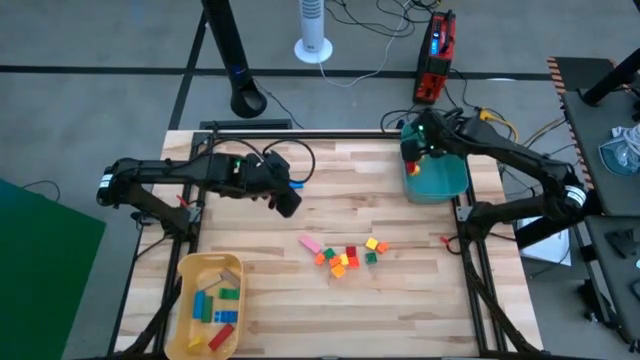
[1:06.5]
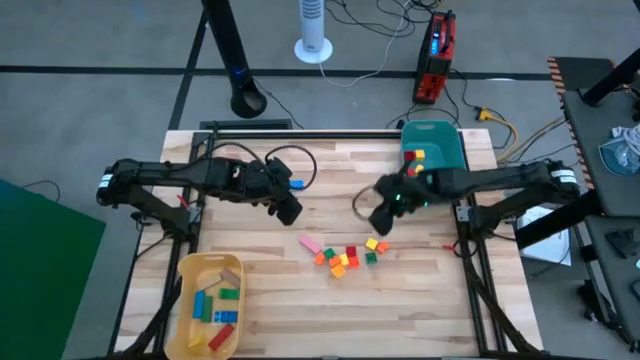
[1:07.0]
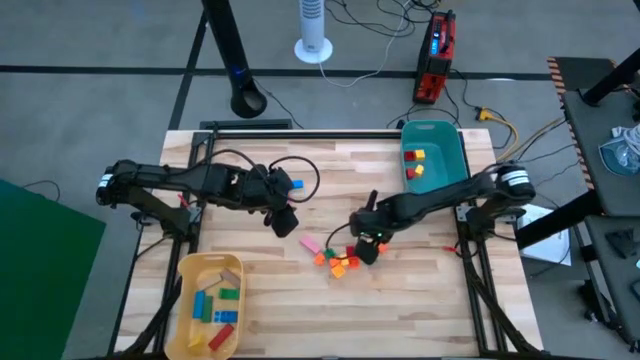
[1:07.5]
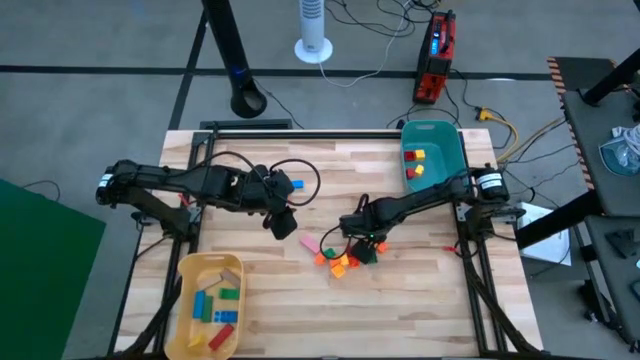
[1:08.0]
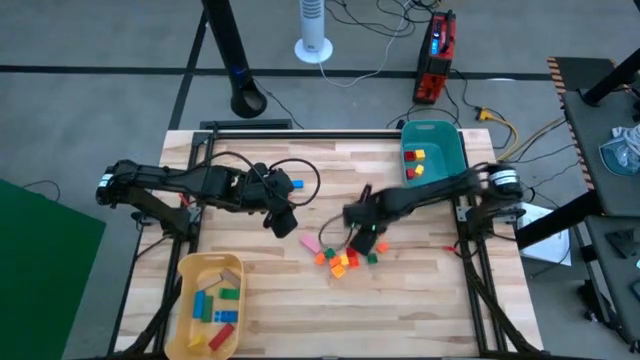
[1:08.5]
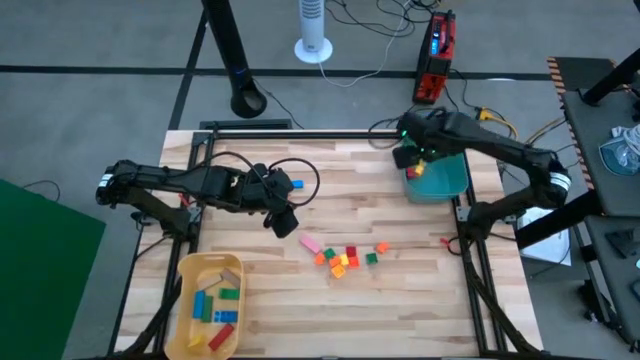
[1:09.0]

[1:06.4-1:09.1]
Task: Sort blocks
Put the yellow square block into the green bin

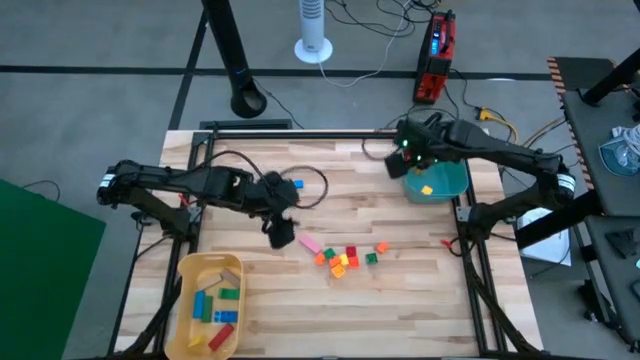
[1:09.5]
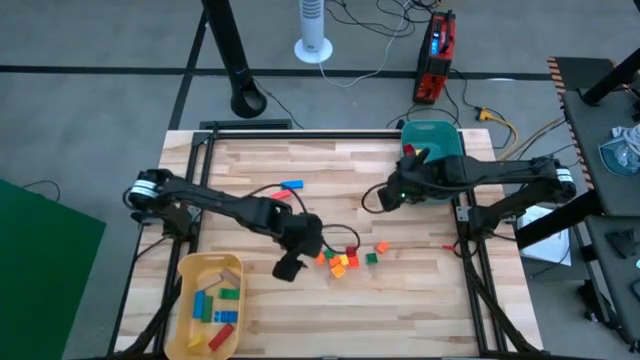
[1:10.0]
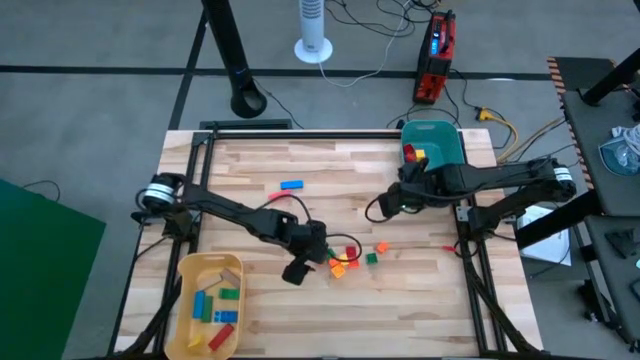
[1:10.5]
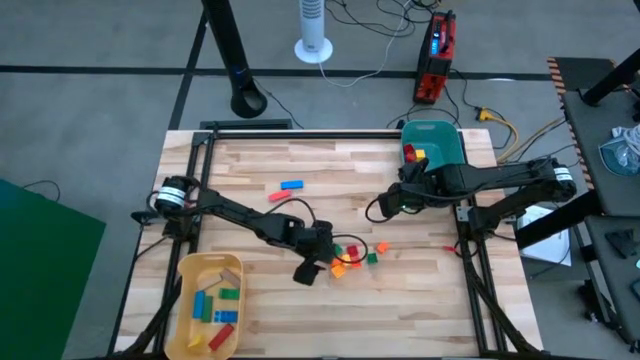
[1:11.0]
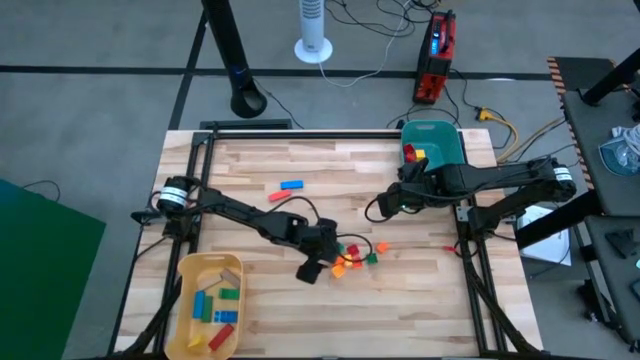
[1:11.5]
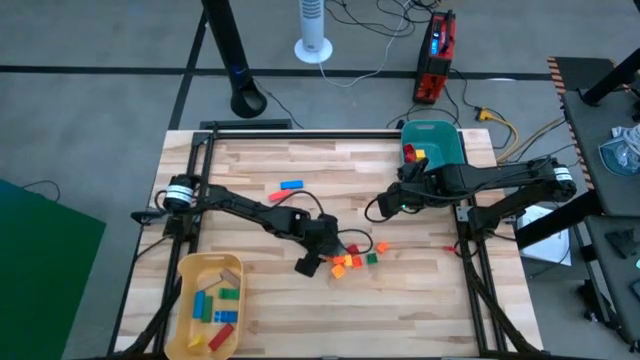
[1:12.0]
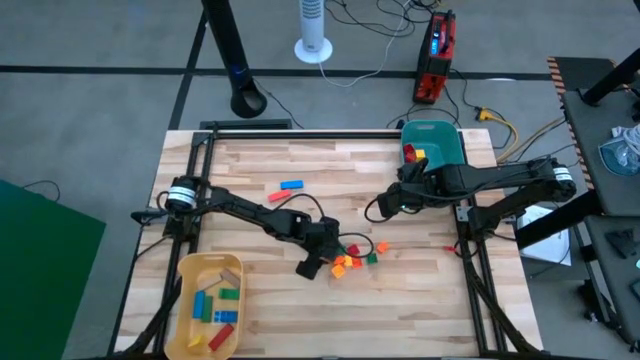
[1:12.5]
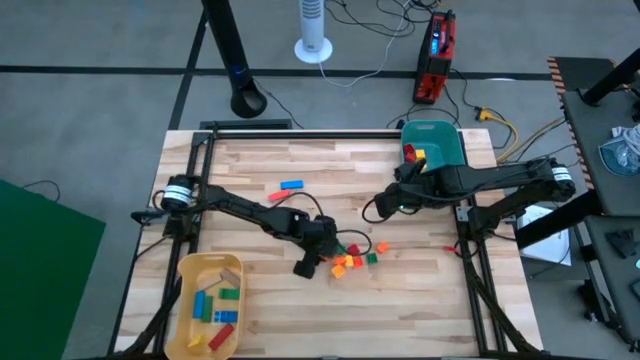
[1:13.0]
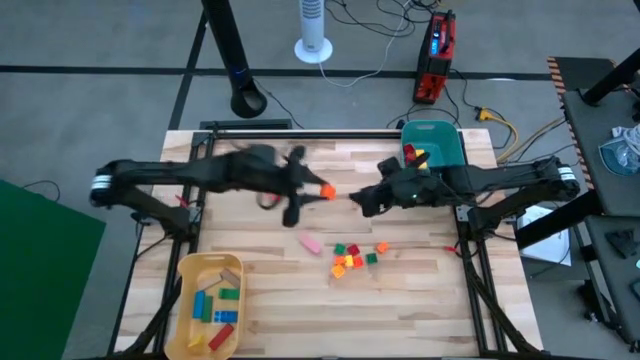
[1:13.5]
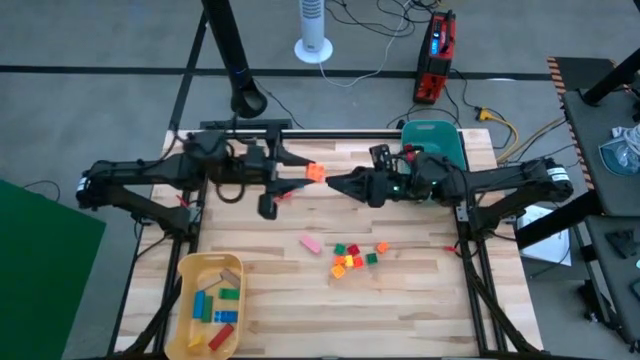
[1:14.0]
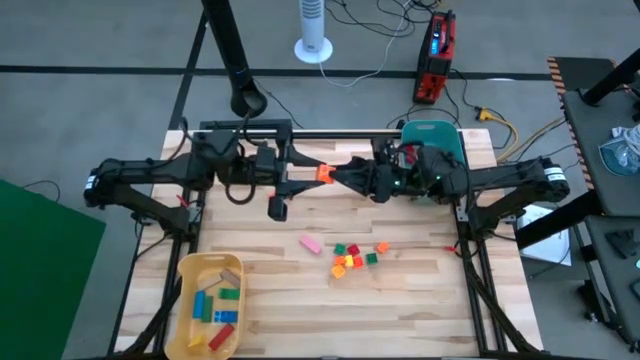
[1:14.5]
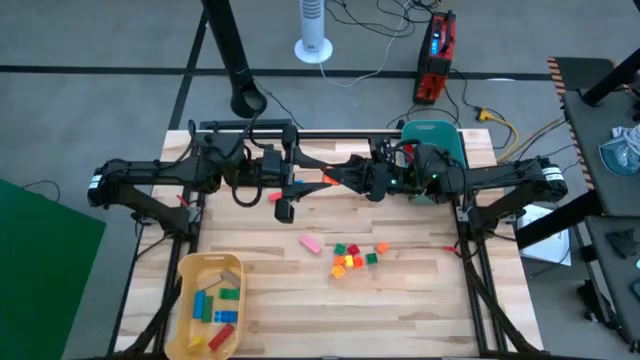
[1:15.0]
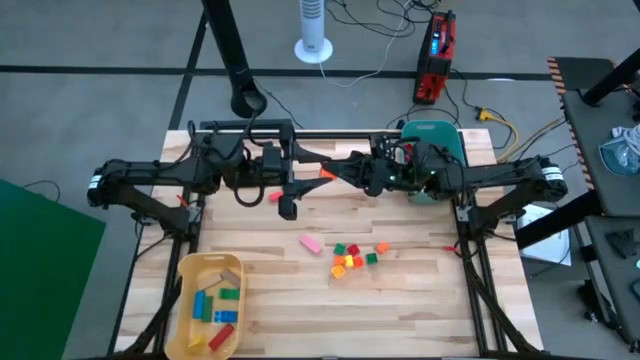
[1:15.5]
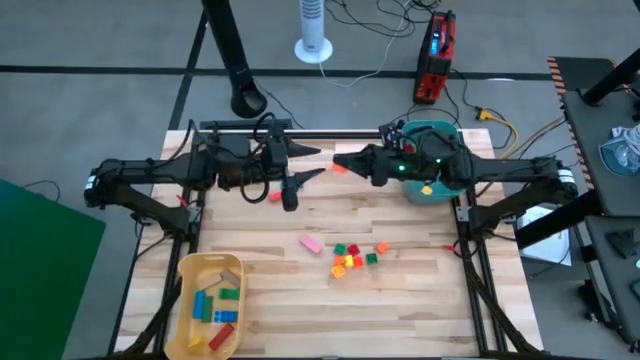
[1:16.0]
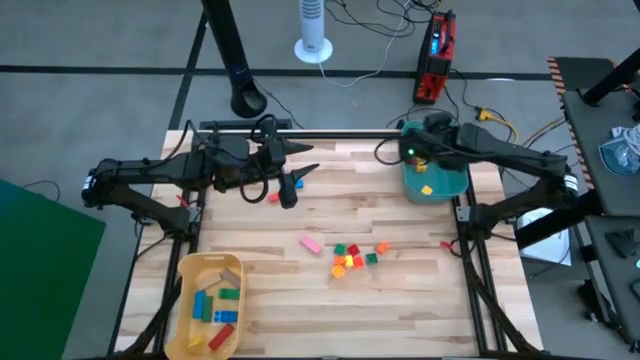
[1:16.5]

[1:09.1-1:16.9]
Put the orange 4-stud game piece into the green bin

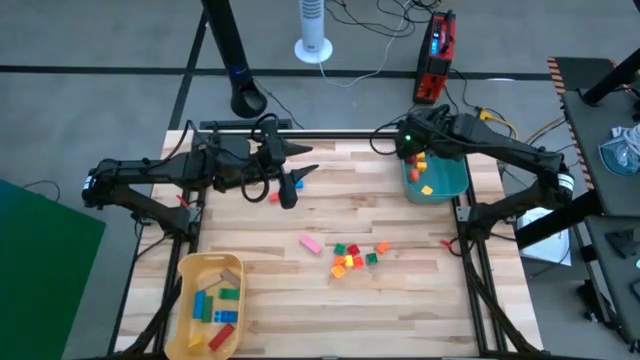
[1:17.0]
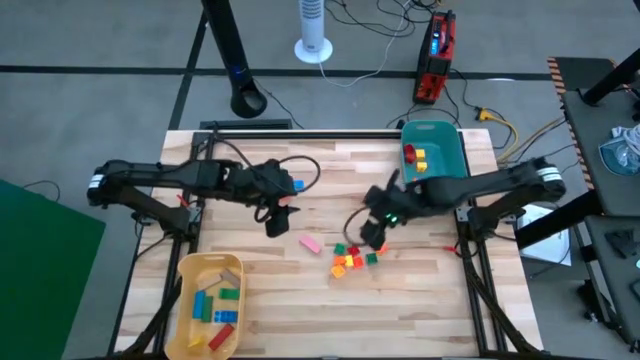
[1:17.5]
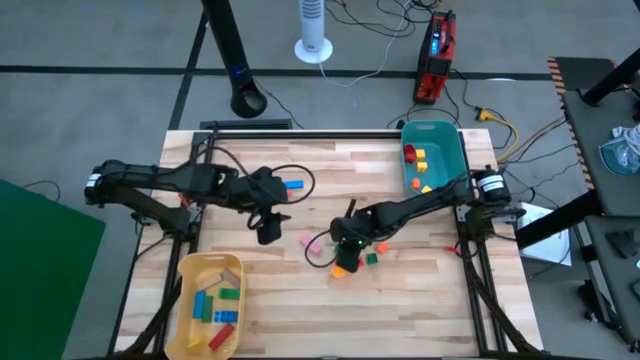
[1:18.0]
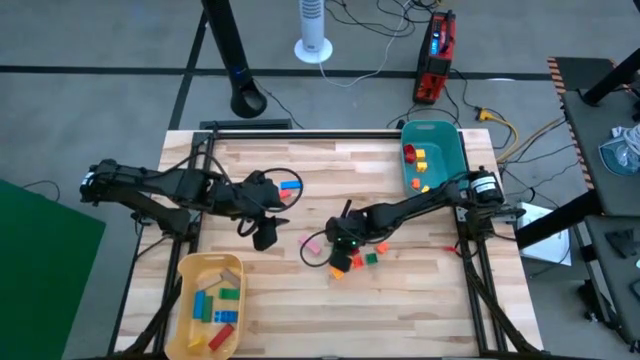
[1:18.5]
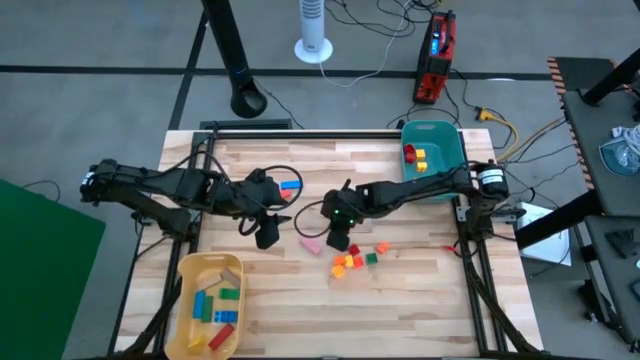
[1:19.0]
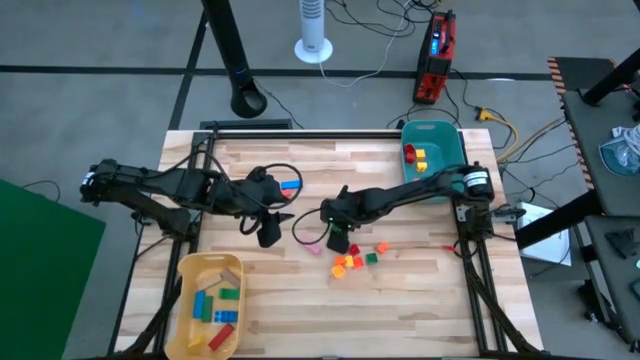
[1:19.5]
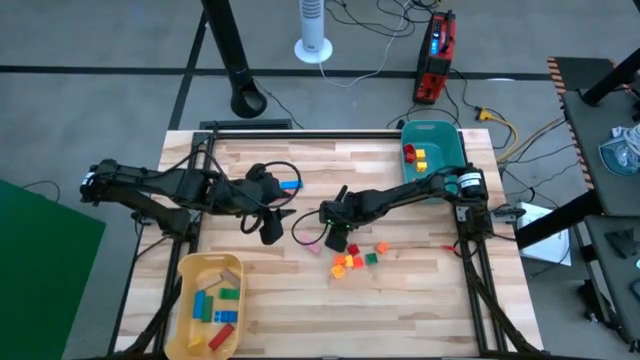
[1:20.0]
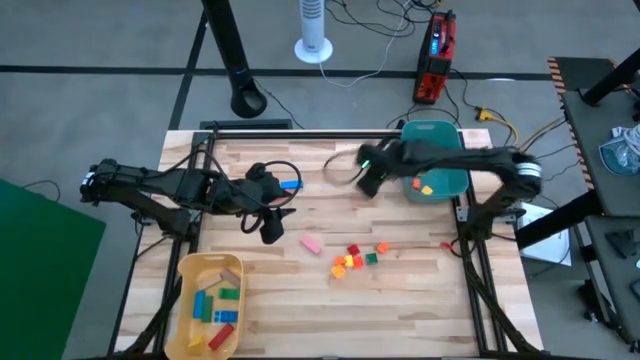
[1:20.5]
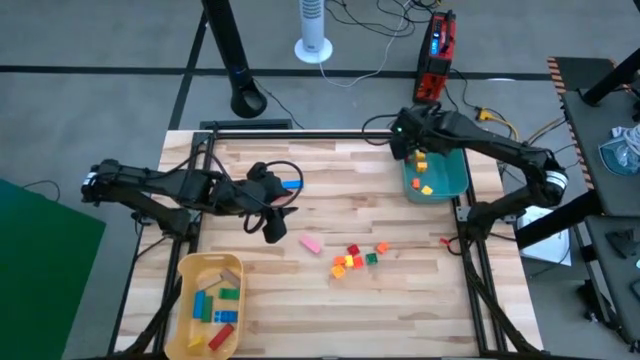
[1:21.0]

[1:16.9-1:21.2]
Put the green 4-stud game piece into the green bin

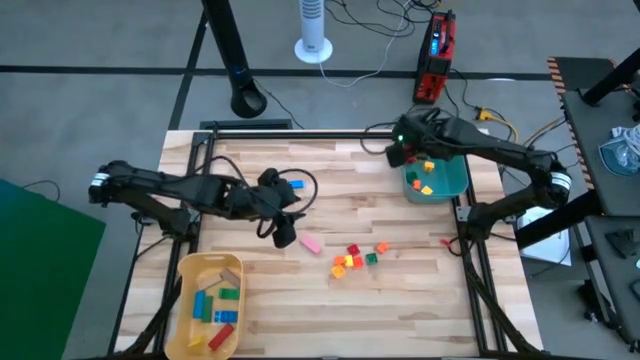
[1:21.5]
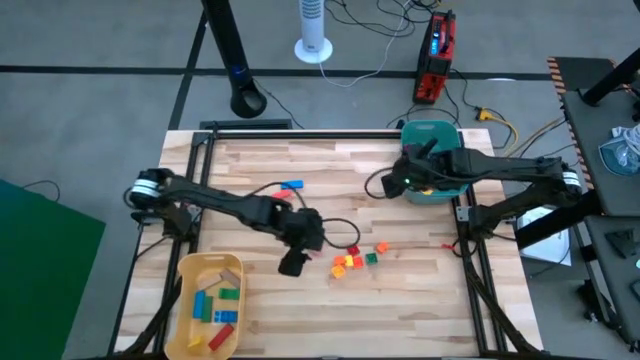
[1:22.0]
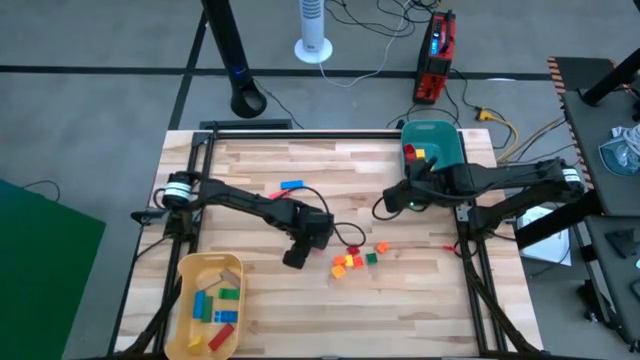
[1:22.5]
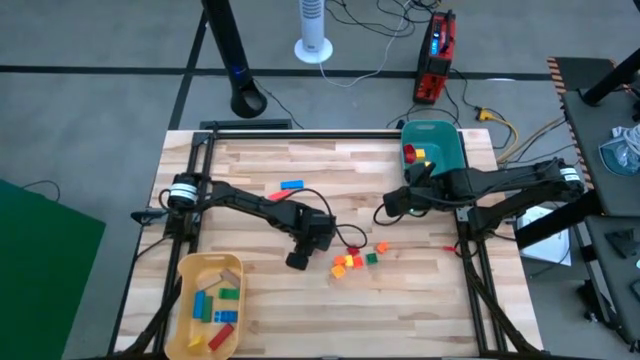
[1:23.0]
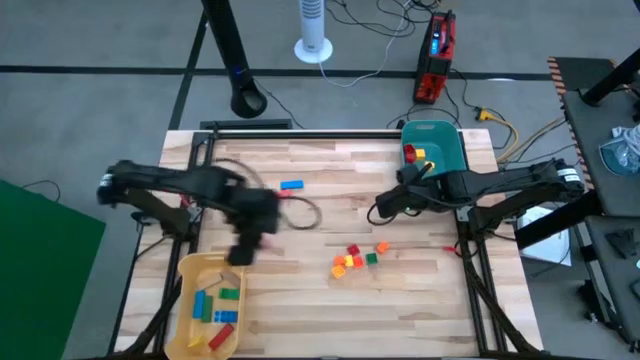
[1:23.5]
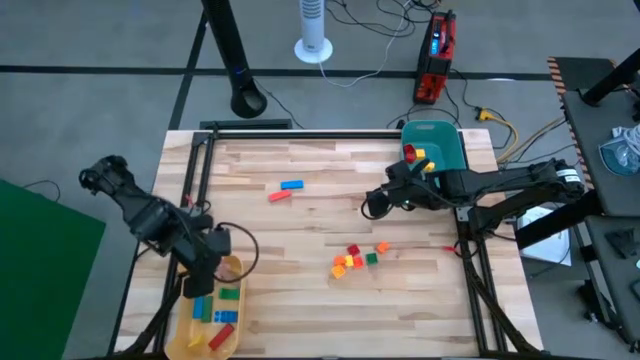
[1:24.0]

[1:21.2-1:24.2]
Put the pink rectangular block into the yellow bin

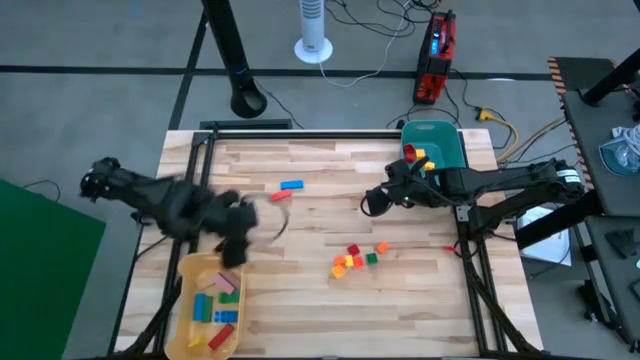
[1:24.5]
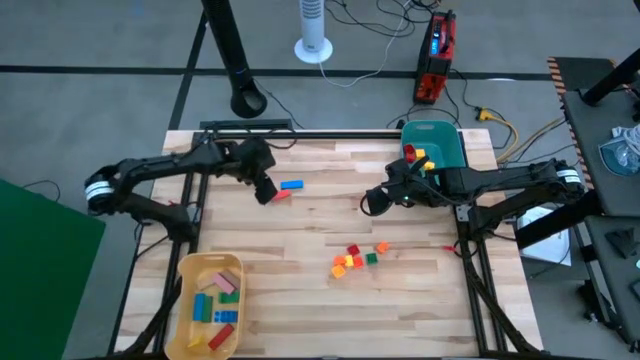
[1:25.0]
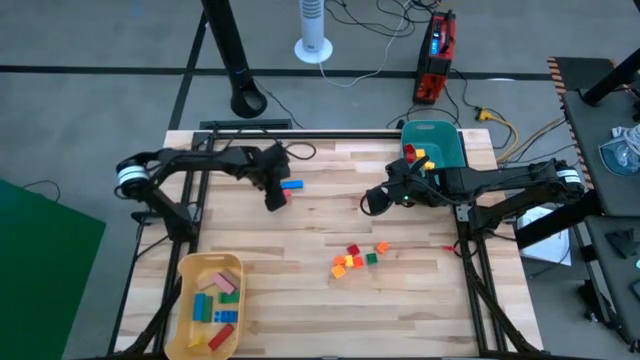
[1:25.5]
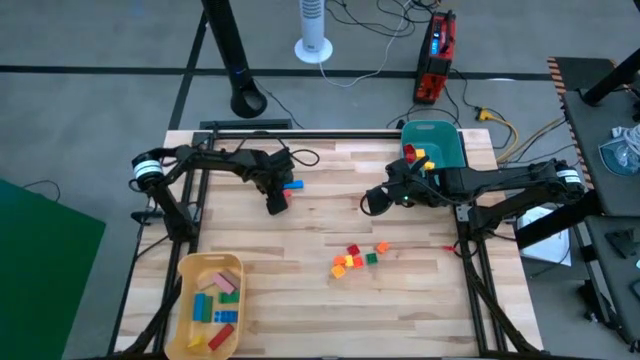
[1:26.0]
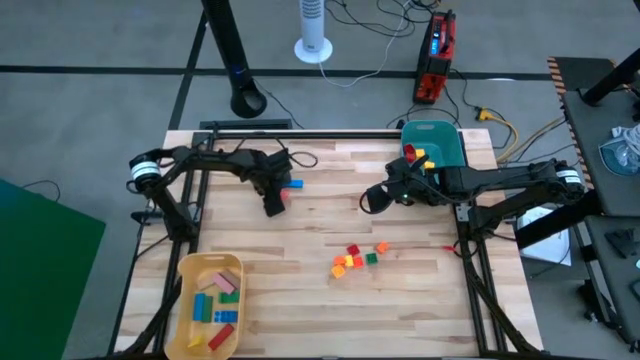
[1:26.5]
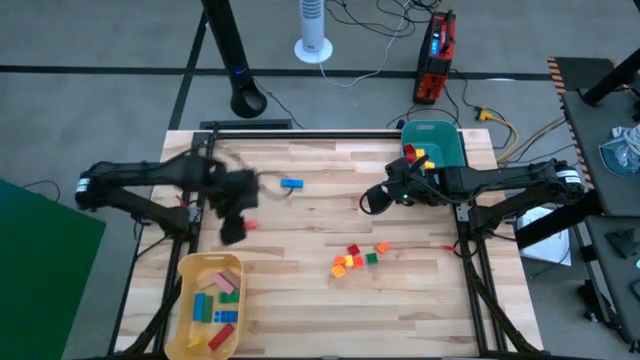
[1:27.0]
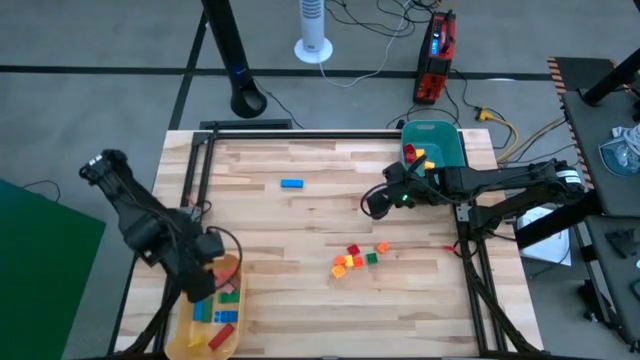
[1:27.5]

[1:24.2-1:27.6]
Put the orange rectangular block into the yellow bin

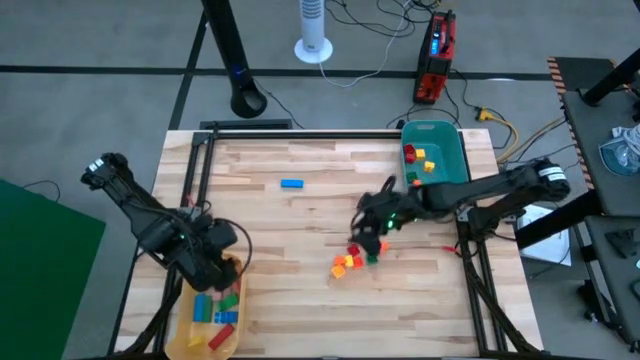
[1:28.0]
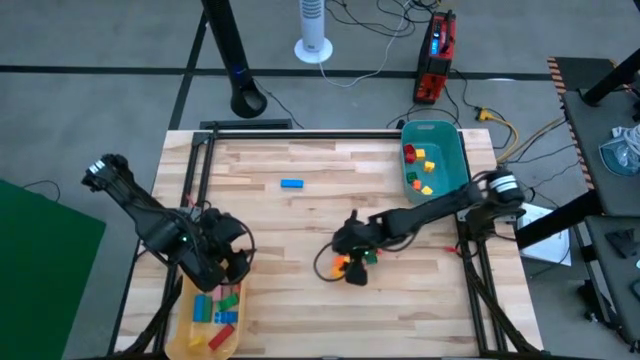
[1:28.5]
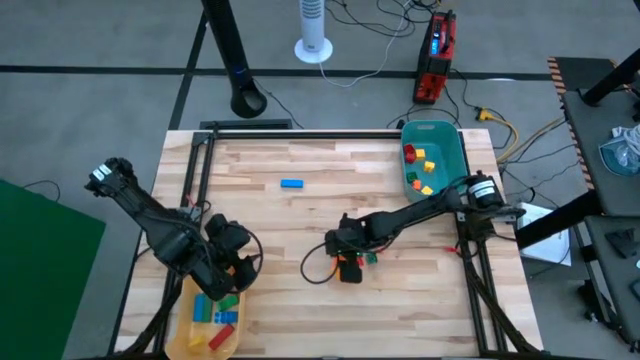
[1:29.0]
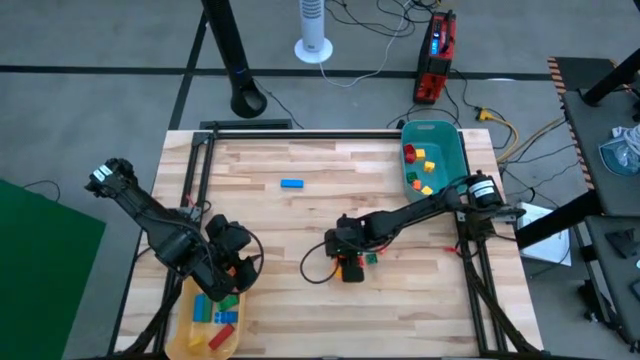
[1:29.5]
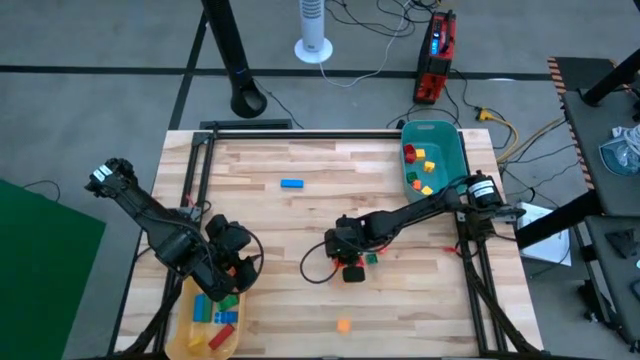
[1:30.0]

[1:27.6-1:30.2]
Put the yellow 4-stud game piece into the green bin
